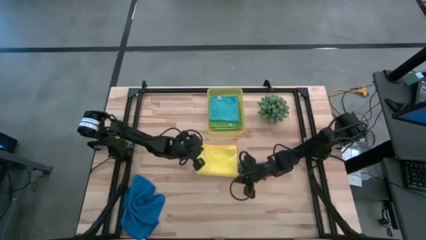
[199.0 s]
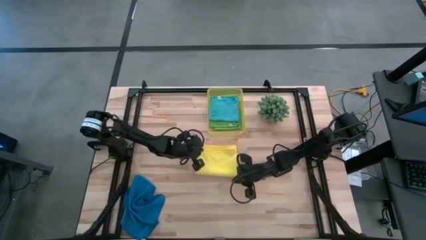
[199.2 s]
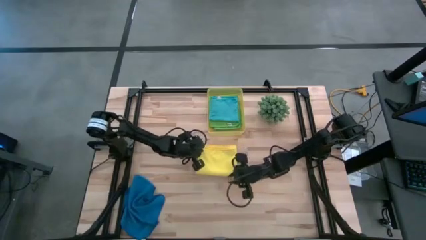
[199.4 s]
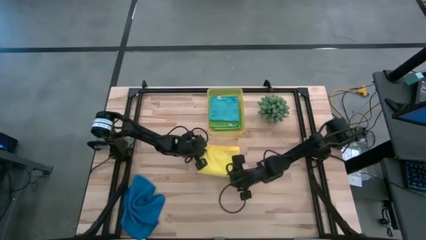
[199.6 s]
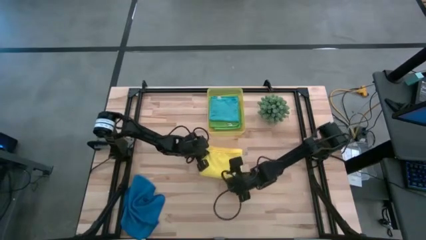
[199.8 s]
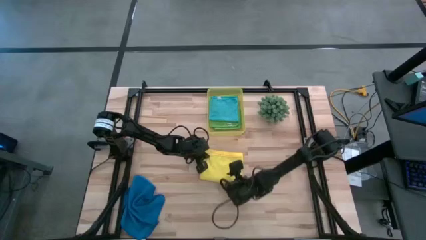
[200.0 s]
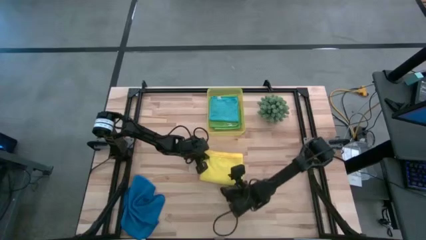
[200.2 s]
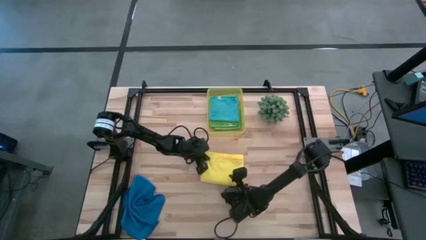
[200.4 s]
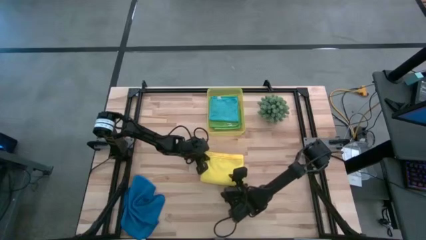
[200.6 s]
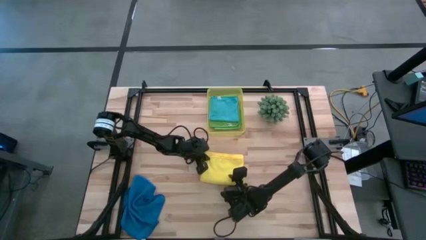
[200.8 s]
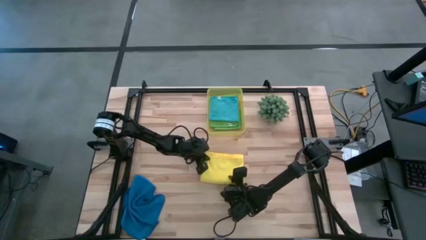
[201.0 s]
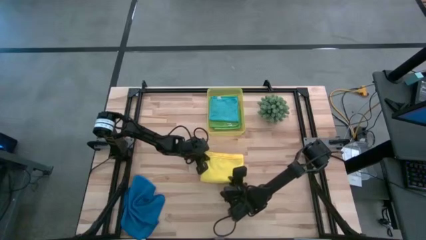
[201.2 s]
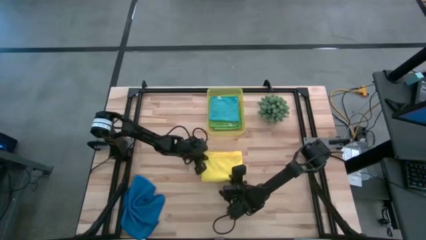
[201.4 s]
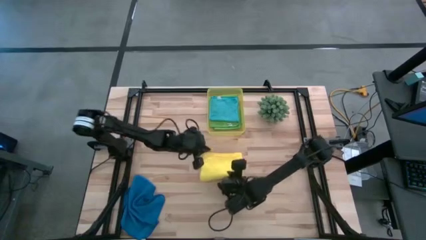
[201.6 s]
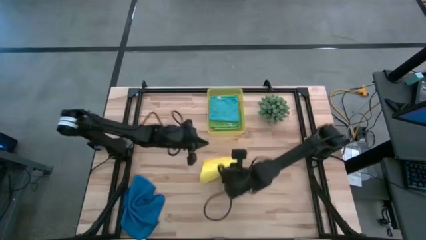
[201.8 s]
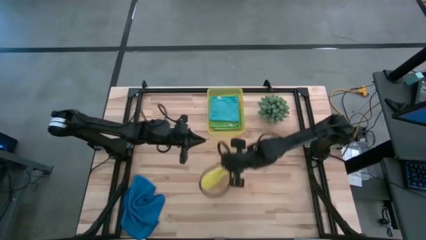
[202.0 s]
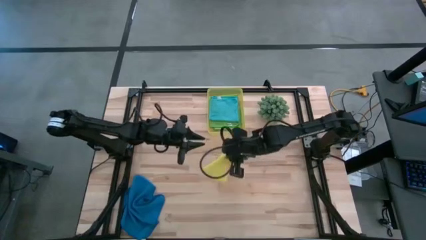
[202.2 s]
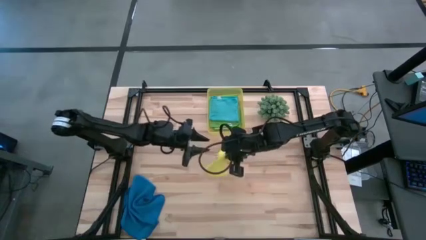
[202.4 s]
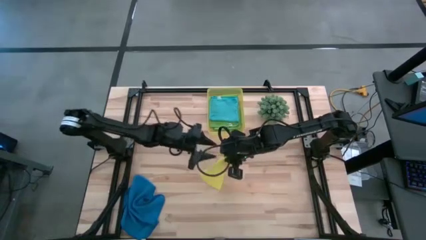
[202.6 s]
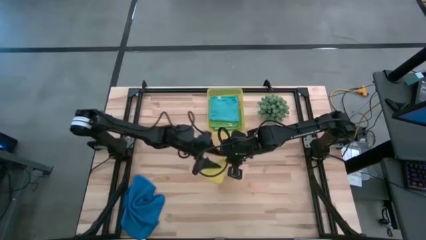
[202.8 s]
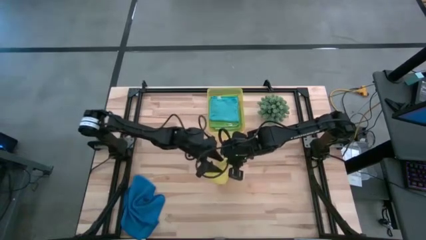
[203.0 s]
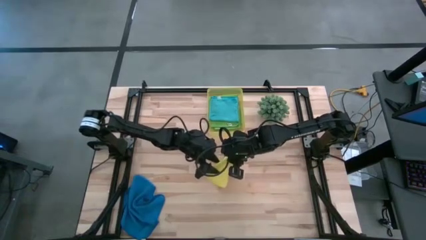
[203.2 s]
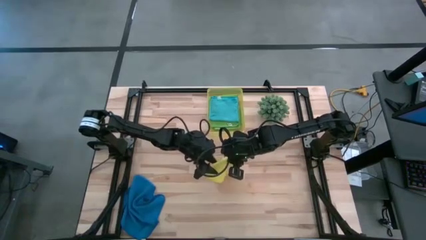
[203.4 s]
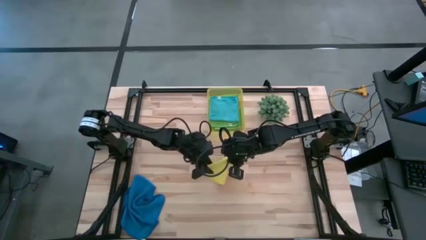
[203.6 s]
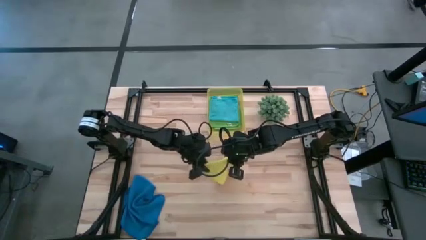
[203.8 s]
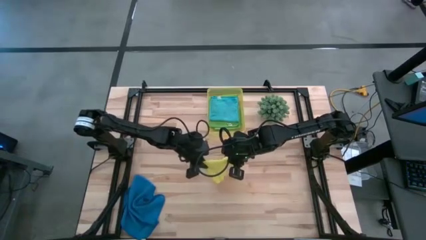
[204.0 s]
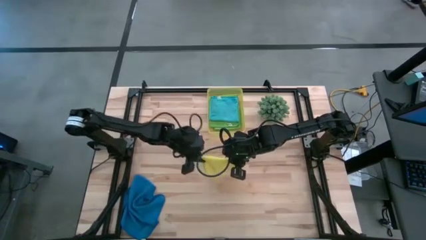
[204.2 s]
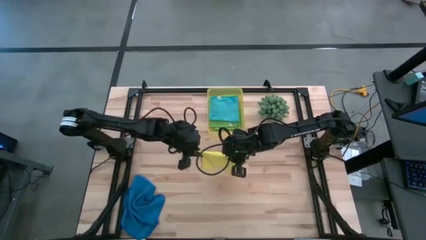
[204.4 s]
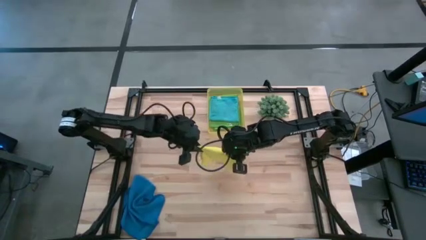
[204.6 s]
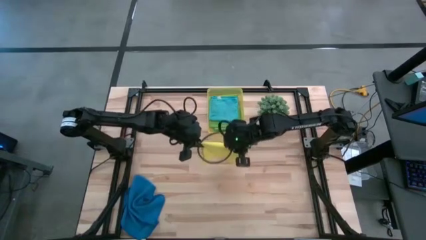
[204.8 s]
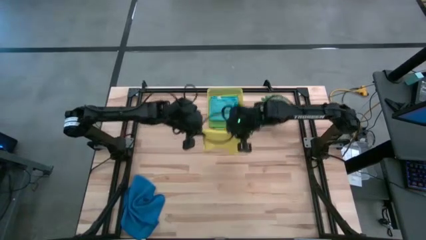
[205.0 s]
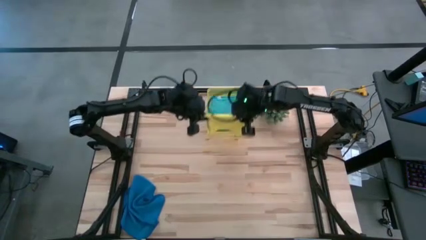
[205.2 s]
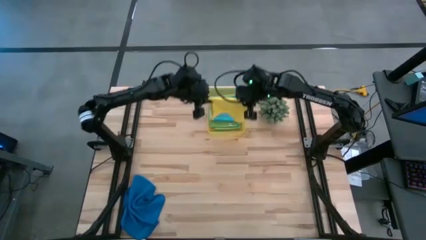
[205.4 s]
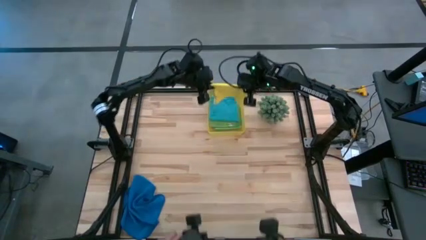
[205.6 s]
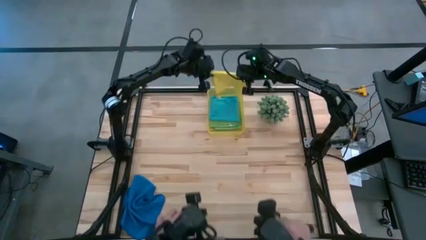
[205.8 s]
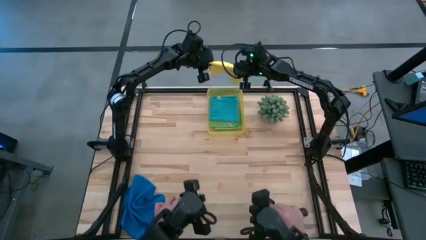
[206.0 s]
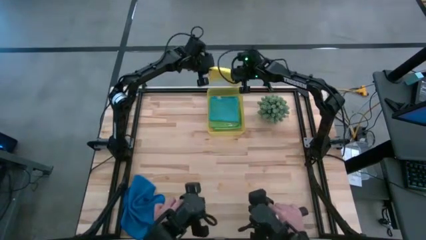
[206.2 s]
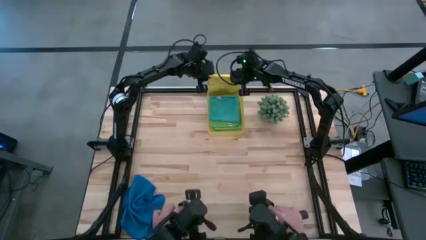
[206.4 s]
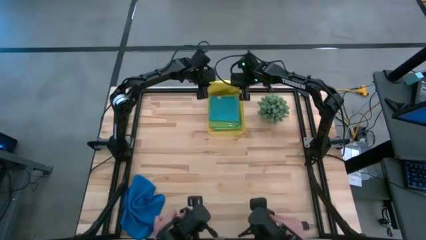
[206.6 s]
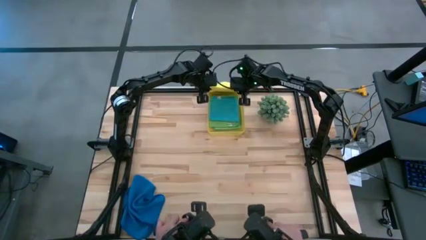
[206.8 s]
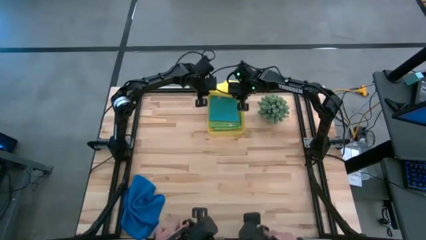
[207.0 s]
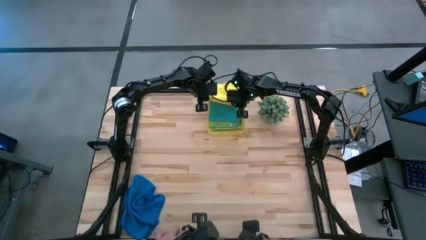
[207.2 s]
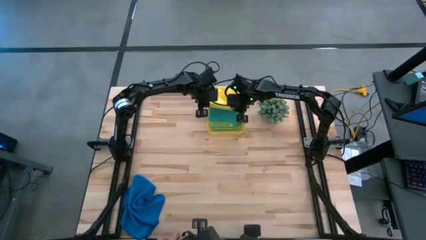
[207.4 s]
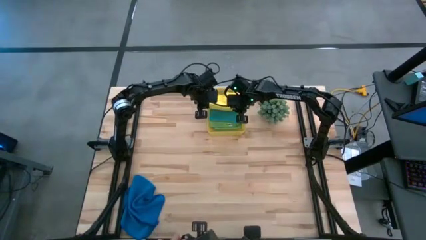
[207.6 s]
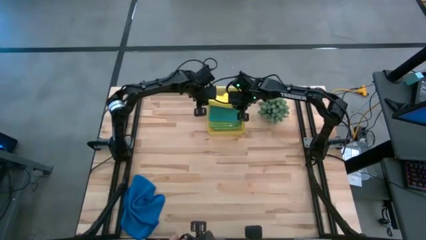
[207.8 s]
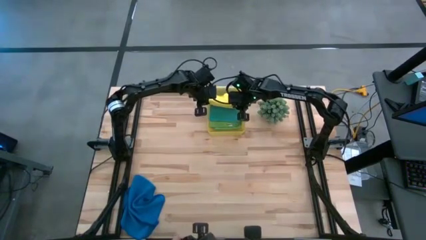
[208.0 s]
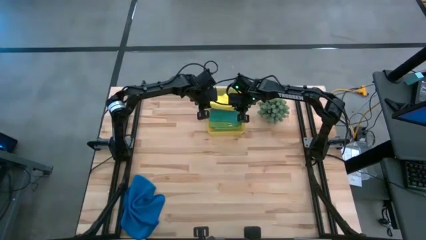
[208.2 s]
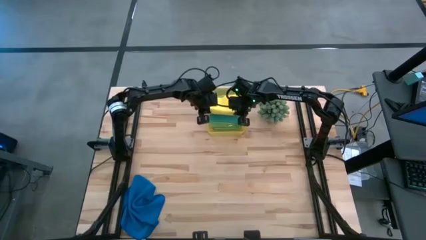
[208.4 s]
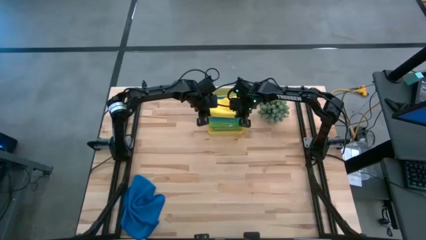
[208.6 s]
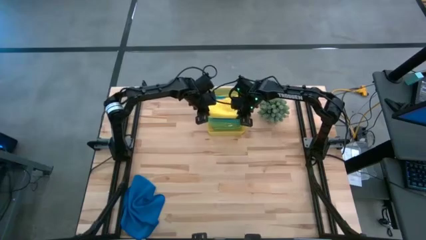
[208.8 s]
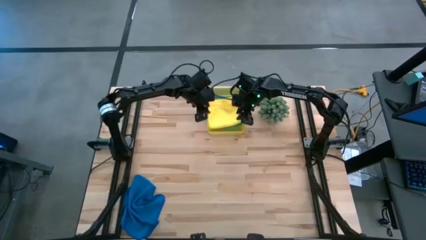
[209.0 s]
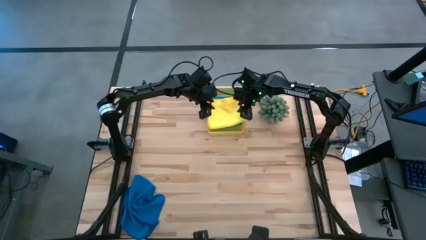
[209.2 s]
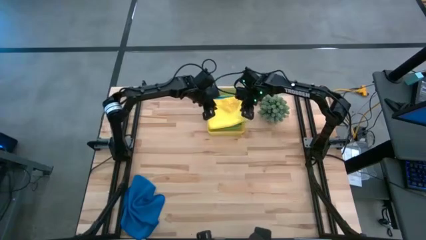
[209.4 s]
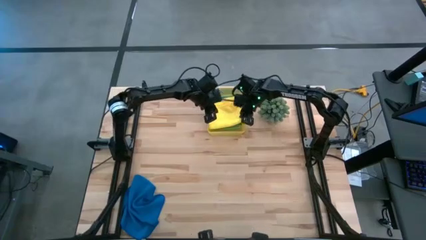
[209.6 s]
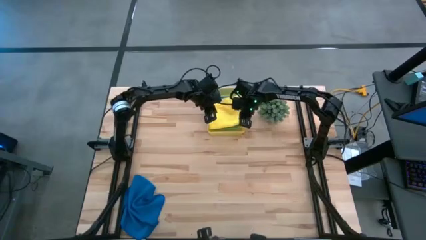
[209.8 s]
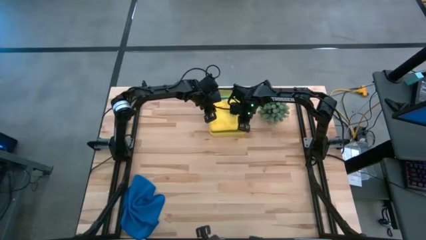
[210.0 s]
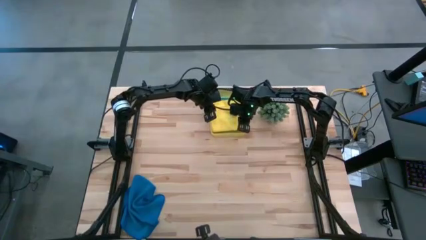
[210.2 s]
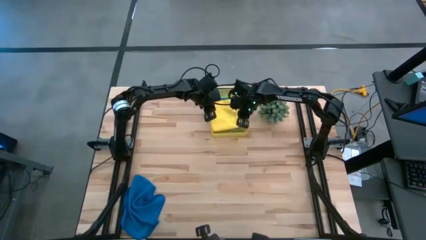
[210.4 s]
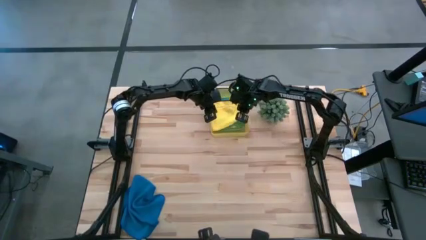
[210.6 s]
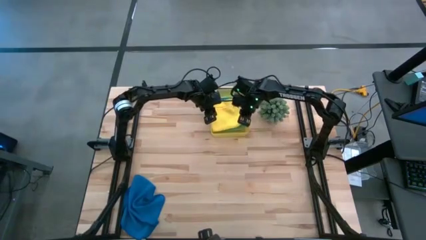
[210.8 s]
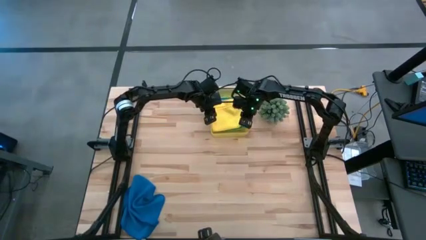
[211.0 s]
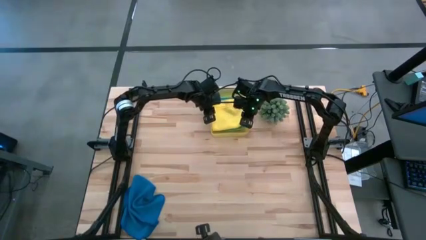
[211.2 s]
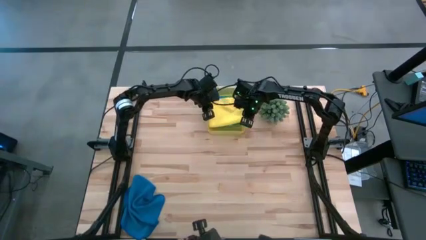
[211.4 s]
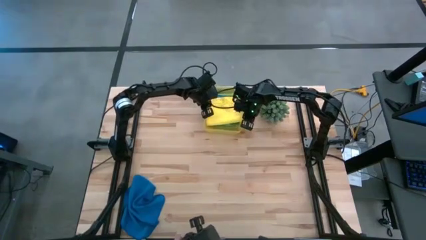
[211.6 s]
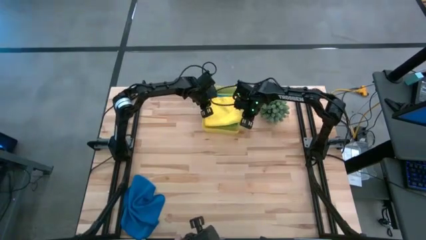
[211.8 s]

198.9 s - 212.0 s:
Task: Fold microfiber towels
Put the yellow microfiber cloth into the yellow bin

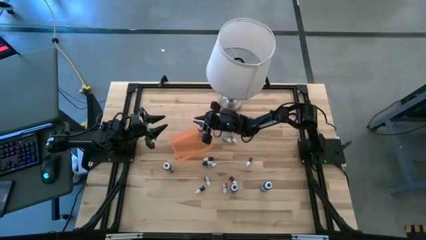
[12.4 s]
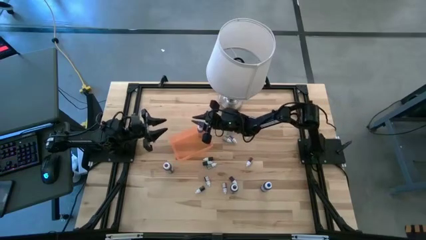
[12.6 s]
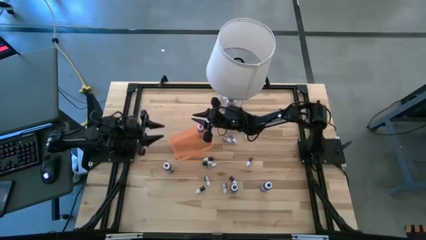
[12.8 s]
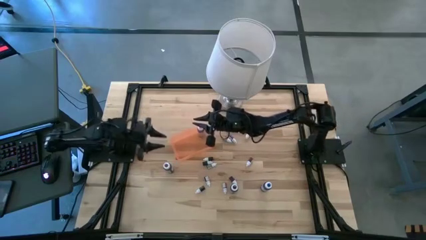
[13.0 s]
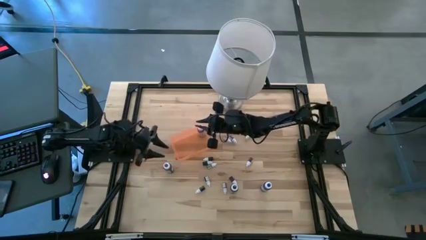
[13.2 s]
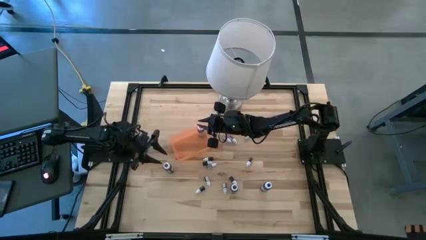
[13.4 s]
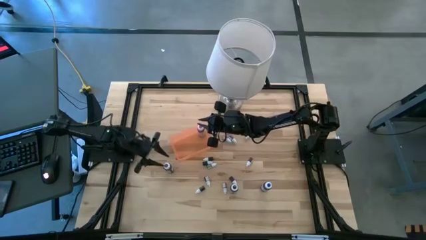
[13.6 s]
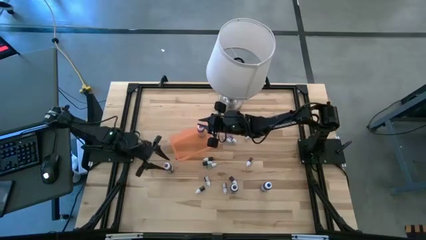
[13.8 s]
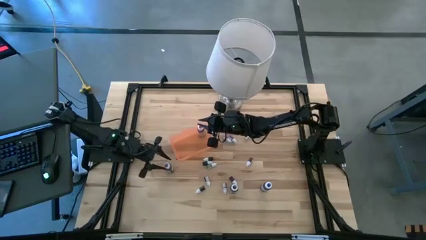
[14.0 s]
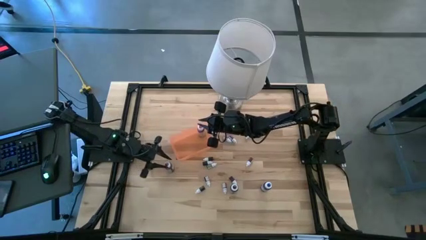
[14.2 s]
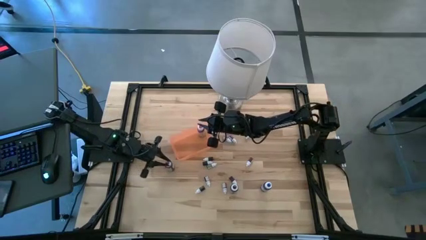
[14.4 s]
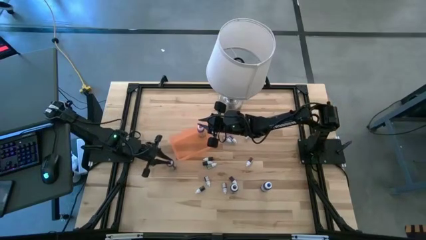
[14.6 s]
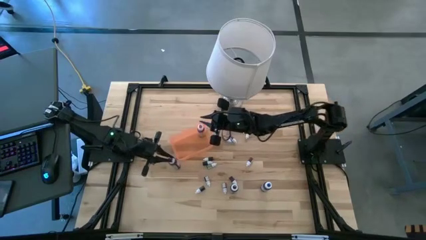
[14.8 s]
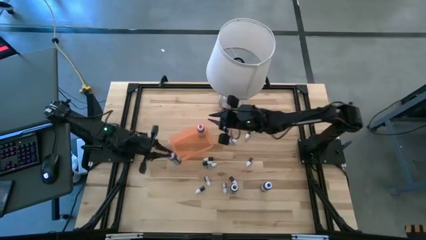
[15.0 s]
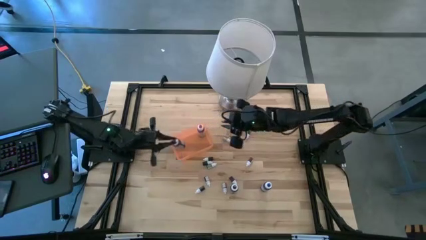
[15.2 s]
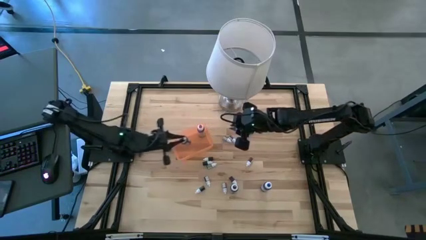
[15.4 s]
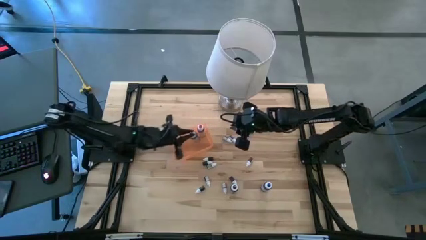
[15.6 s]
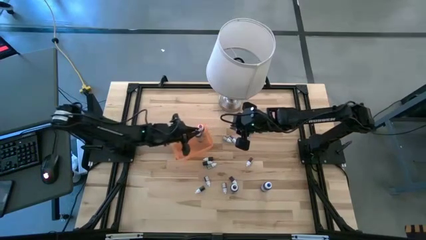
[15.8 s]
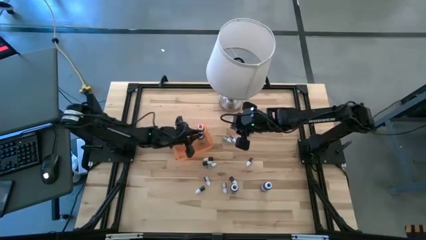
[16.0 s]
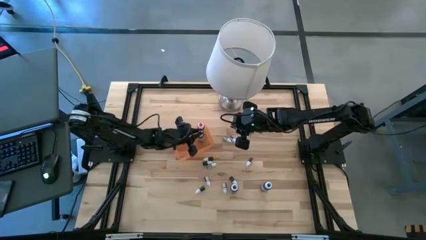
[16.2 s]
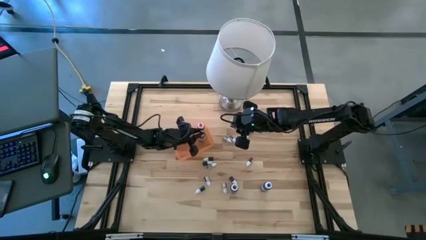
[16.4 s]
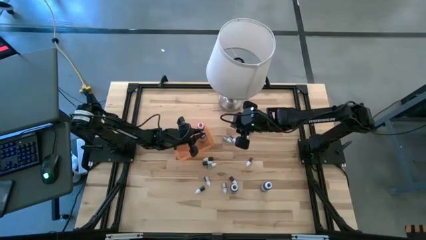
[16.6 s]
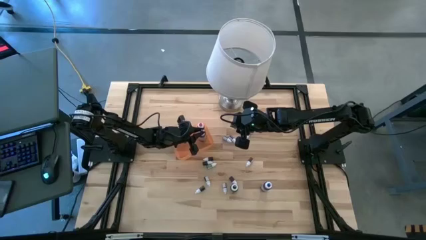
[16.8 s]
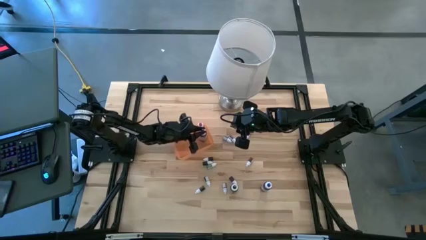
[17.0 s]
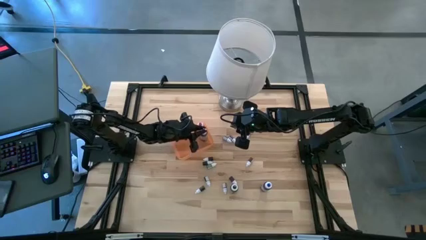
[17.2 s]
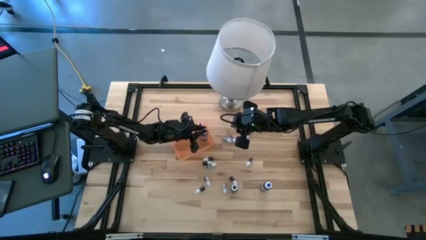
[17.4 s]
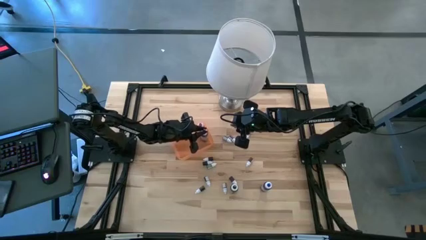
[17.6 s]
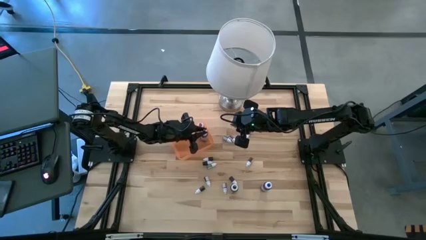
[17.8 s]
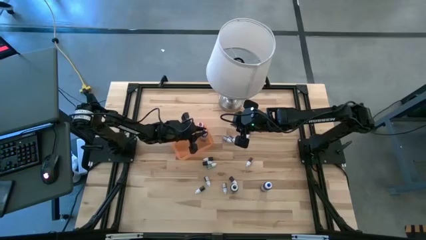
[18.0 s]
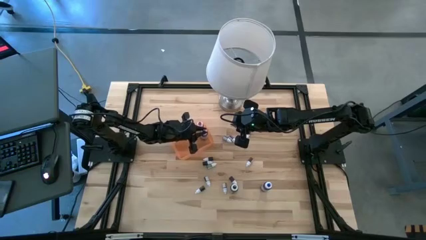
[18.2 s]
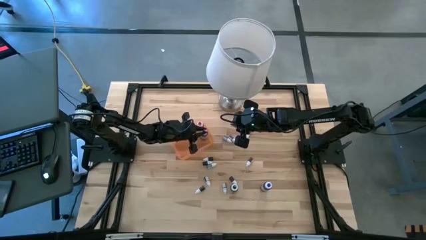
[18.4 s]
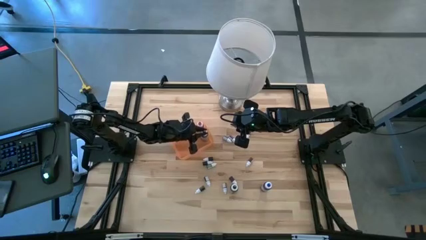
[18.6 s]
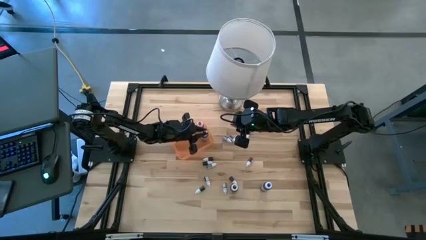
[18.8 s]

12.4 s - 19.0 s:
Task: Pick & Place food coloring
Put the large purple food coloring bottle into the bin
